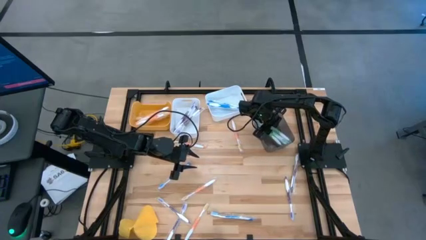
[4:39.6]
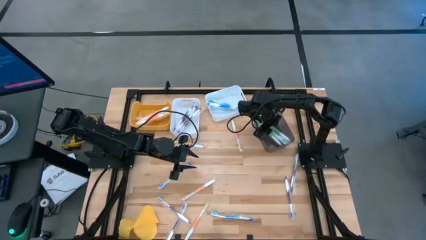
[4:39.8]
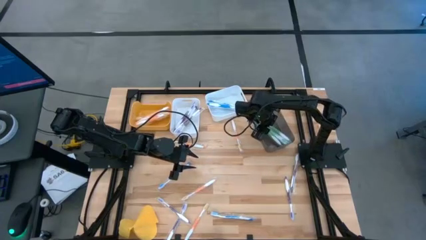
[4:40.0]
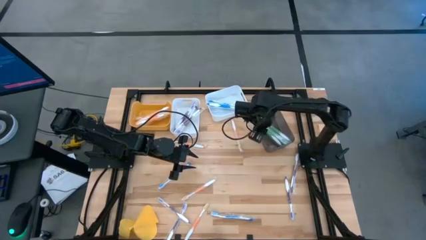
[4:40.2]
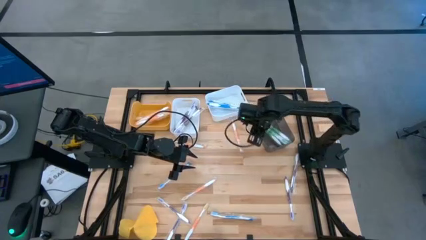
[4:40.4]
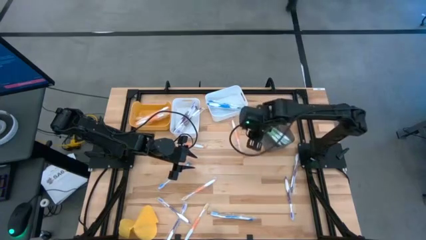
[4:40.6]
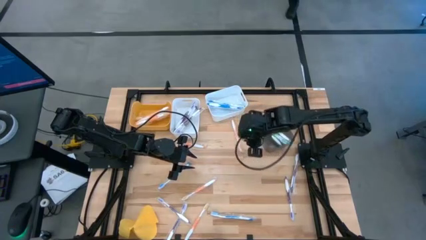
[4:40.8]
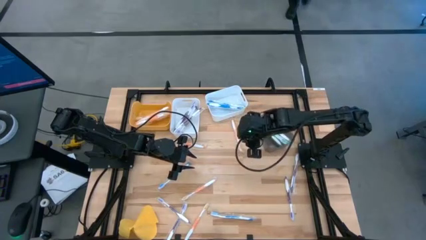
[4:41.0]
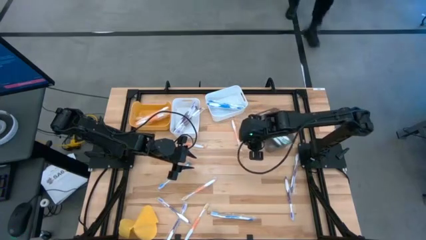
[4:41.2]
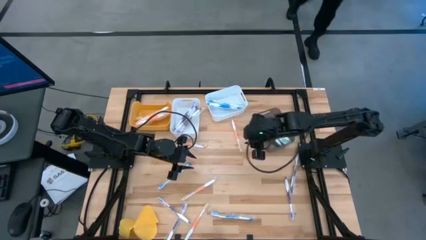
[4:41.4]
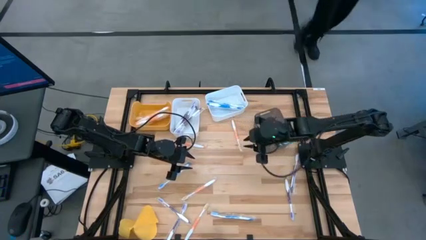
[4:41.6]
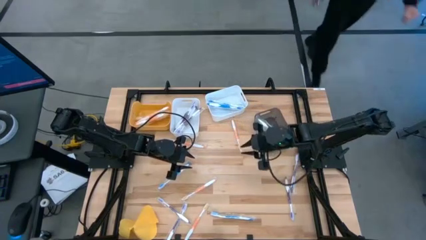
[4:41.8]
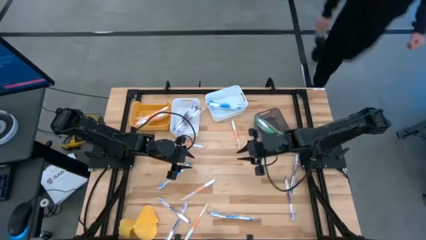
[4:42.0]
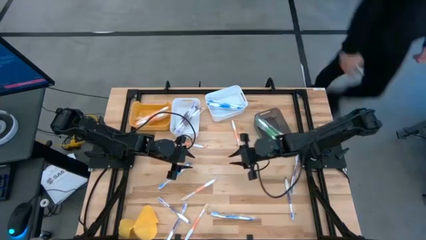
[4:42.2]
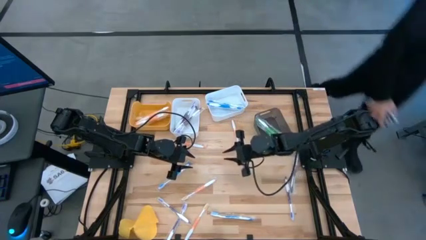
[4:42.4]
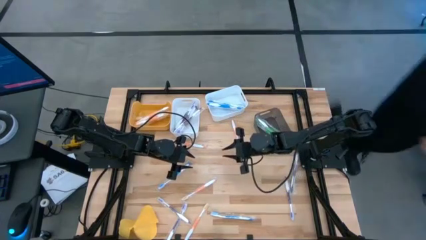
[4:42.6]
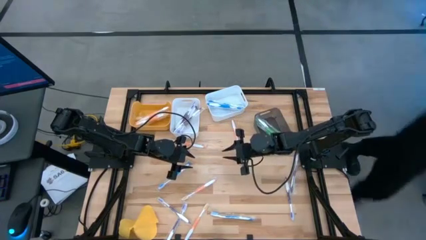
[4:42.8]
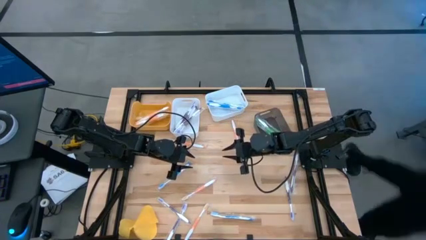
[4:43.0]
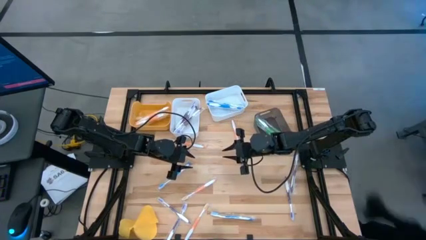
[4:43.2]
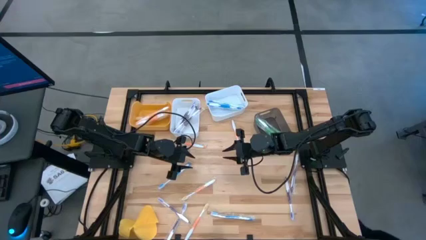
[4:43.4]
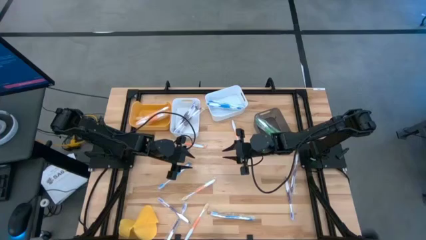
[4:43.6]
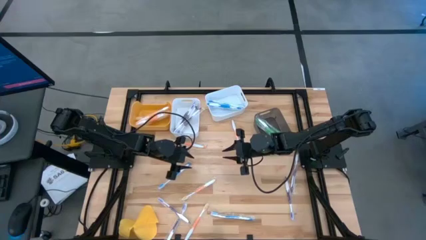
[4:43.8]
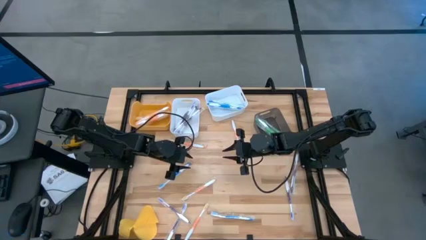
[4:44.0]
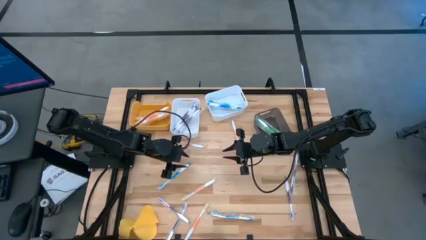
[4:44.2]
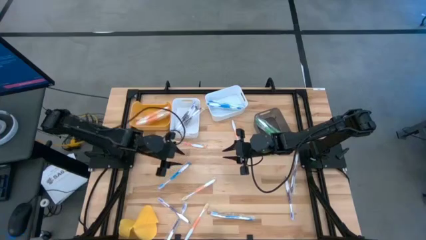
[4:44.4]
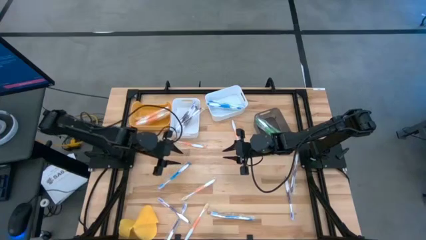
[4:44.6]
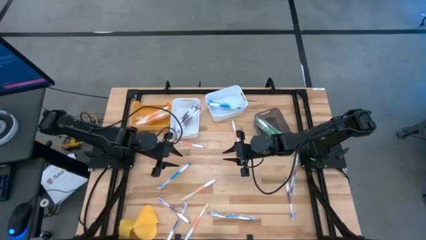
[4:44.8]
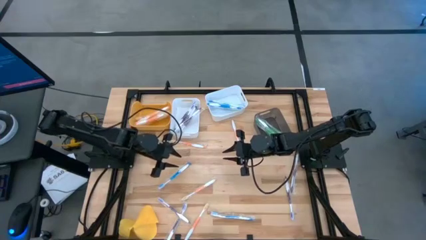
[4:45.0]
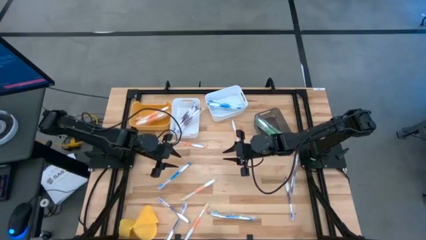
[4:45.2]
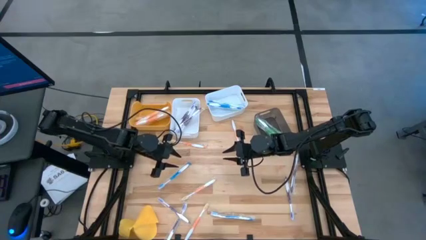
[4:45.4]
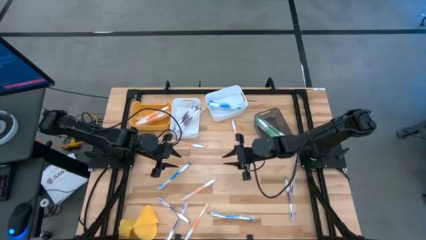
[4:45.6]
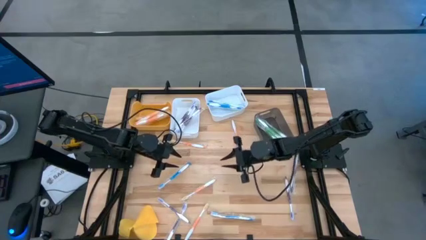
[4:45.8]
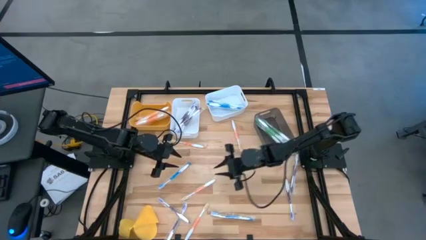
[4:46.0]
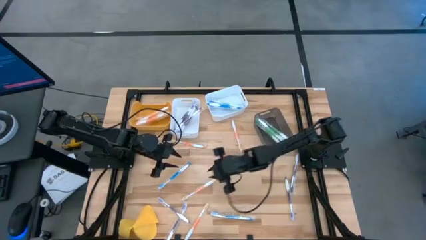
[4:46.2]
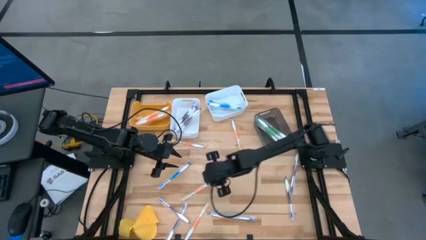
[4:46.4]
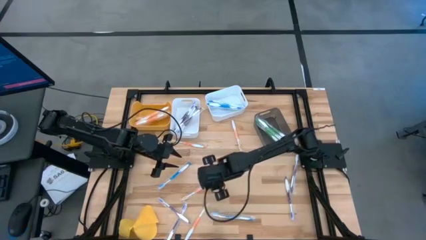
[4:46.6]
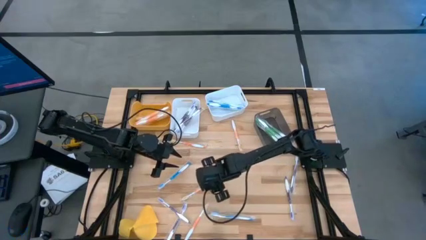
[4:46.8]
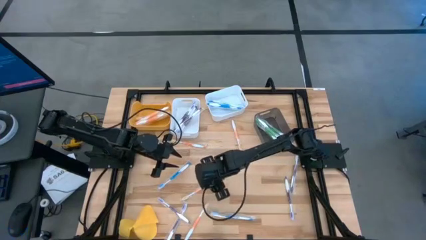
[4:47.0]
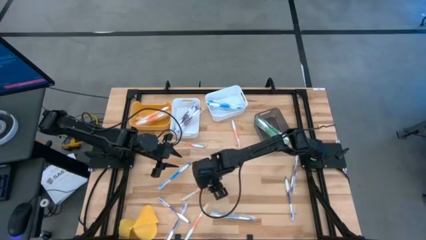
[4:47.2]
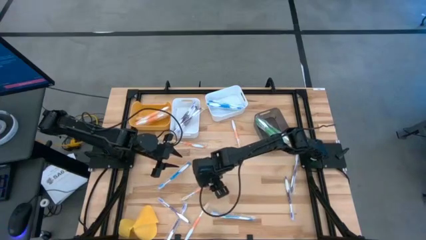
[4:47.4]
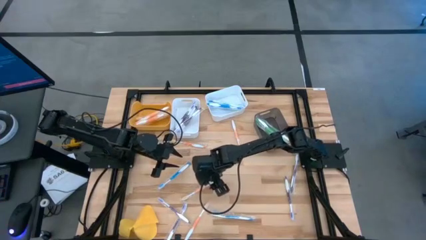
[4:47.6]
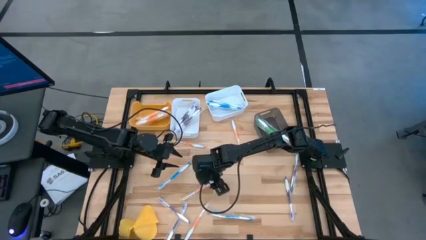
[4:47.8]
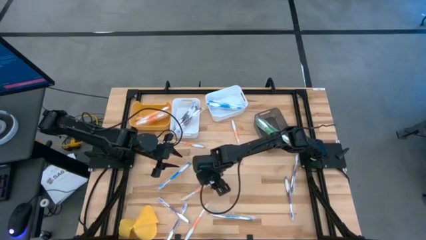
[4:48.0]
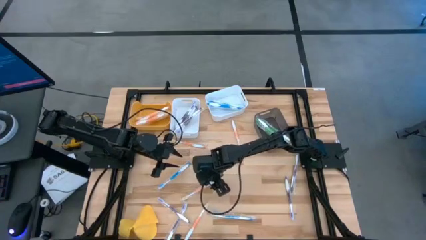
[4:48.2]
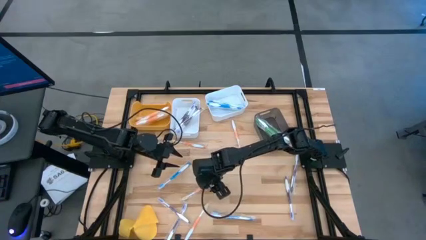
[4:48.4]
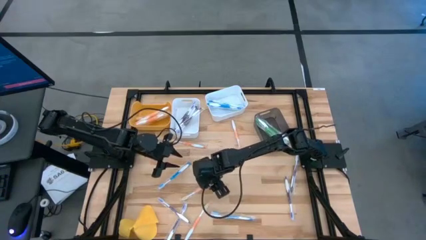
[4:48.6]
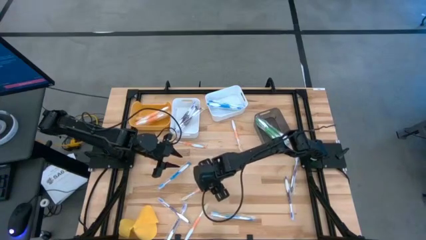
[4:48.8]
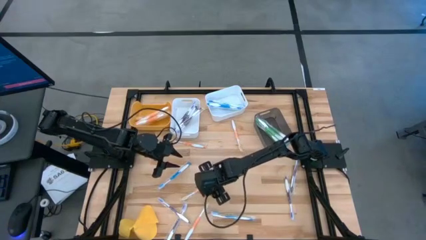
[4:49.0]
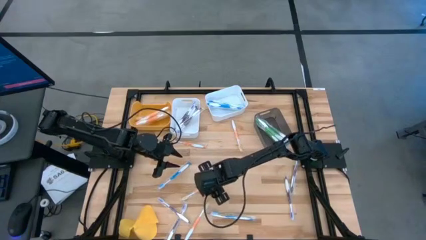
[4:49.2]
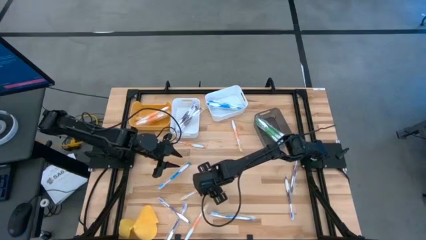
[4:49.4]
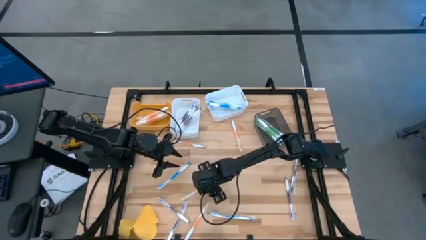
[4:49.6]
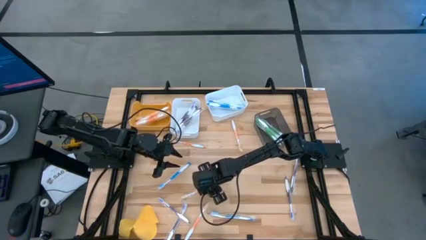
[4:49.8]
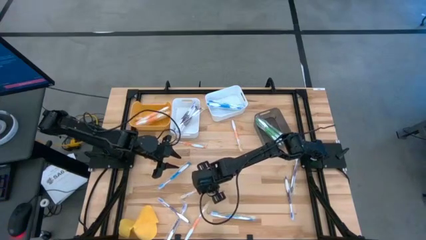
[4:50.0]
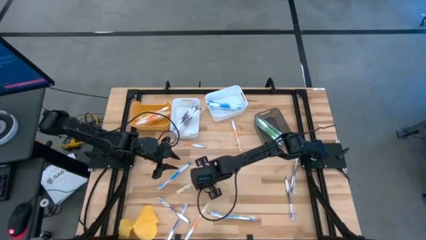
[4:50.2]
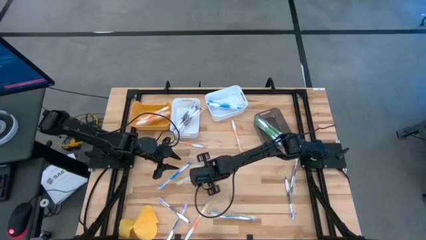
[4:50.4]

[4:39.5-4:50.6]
Task: Pick & Place Toothbrushes
Put the orange toothbrush into the yellow bin
